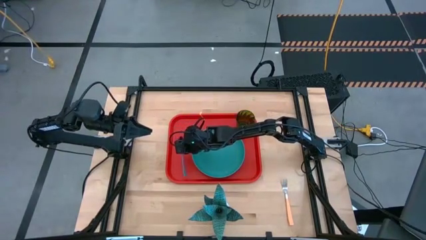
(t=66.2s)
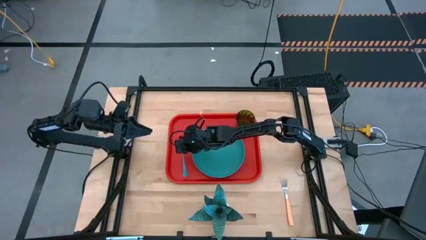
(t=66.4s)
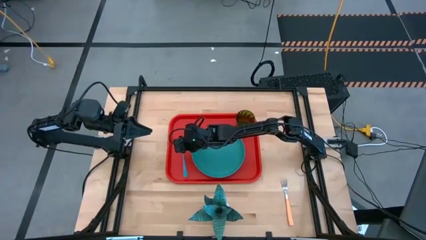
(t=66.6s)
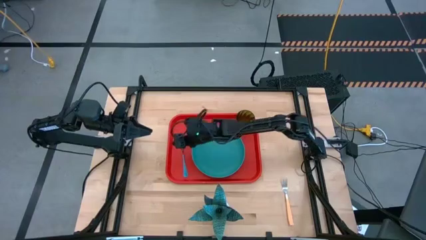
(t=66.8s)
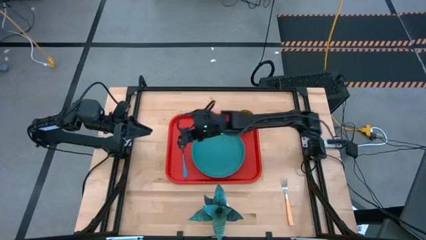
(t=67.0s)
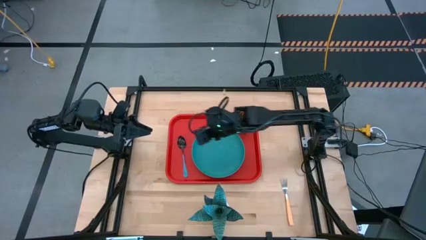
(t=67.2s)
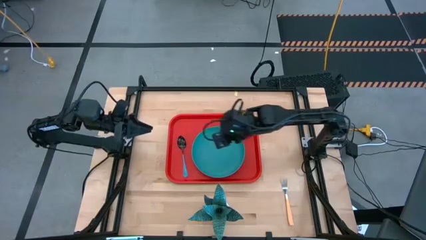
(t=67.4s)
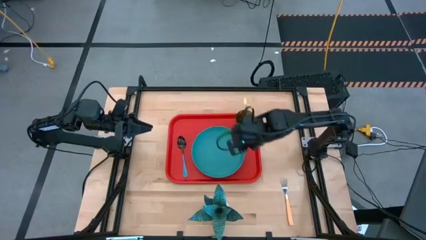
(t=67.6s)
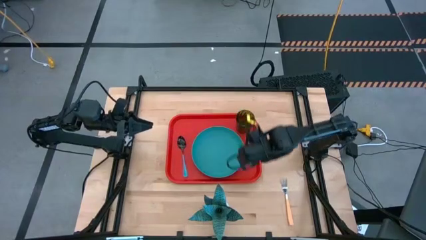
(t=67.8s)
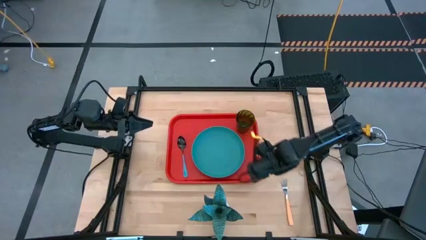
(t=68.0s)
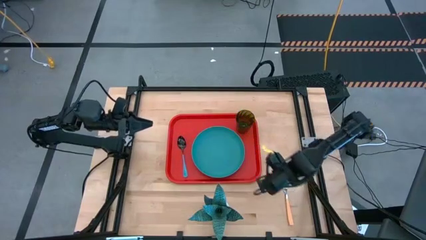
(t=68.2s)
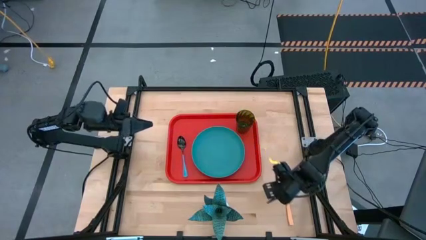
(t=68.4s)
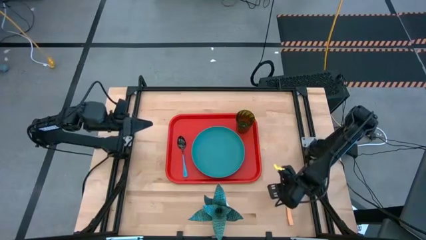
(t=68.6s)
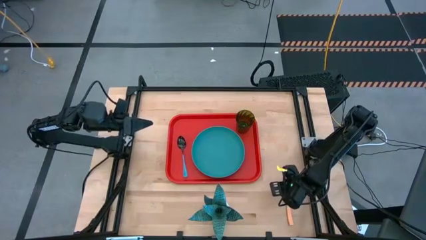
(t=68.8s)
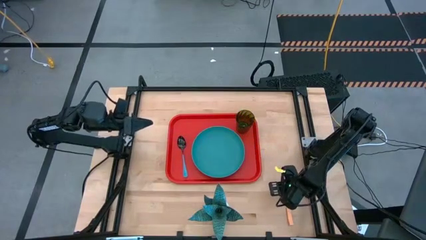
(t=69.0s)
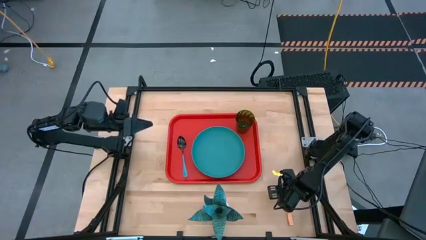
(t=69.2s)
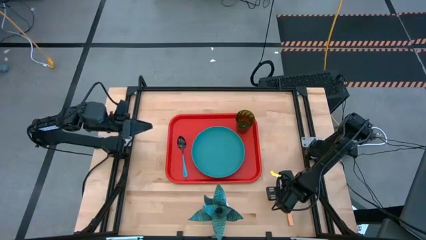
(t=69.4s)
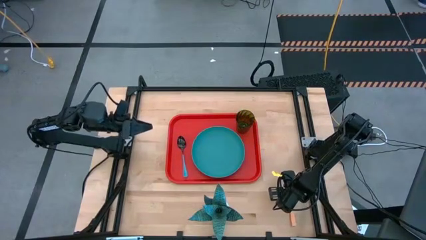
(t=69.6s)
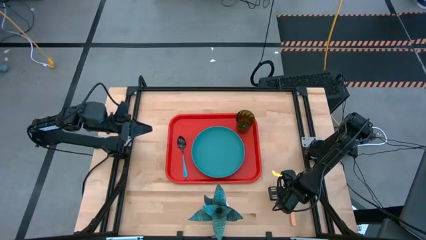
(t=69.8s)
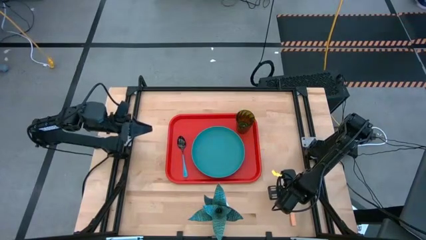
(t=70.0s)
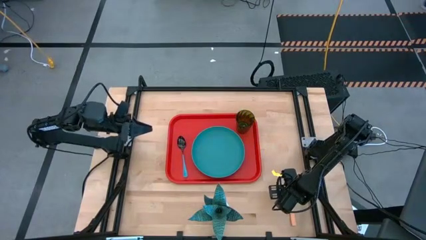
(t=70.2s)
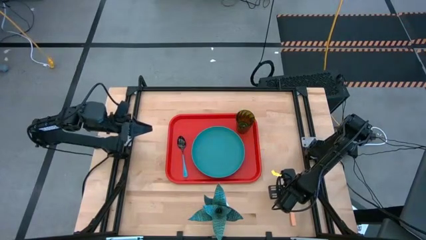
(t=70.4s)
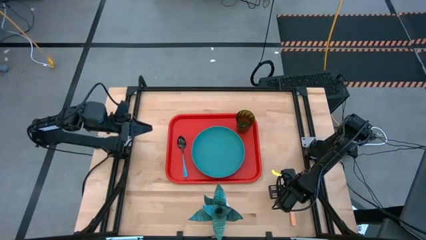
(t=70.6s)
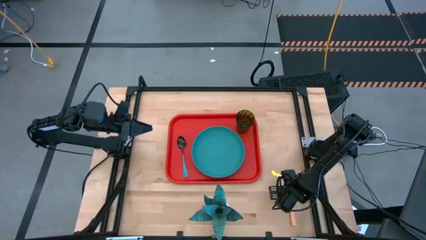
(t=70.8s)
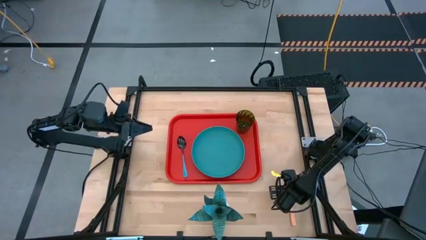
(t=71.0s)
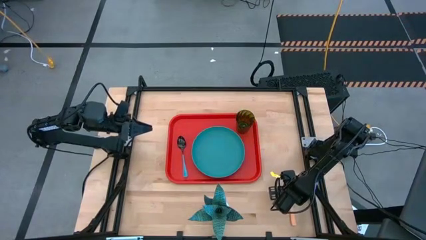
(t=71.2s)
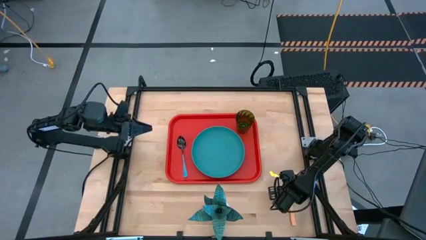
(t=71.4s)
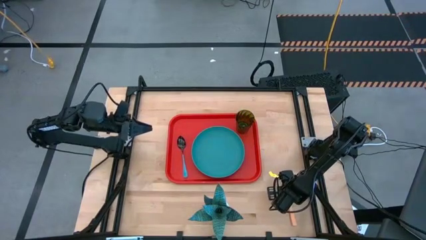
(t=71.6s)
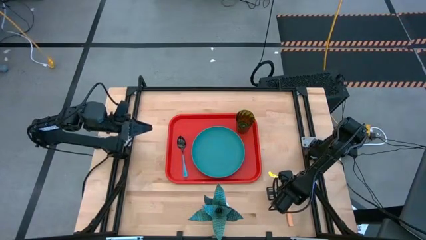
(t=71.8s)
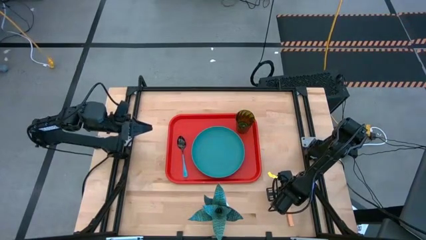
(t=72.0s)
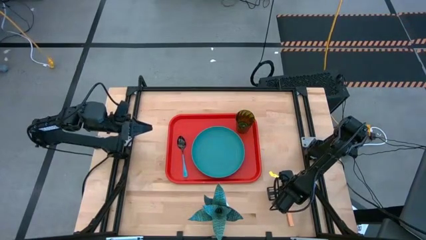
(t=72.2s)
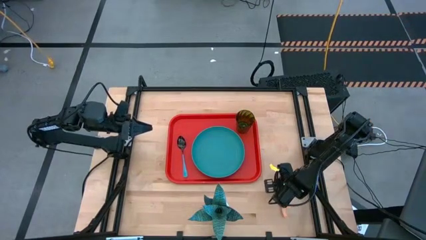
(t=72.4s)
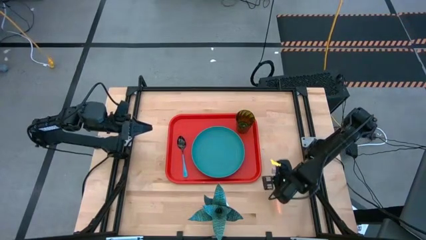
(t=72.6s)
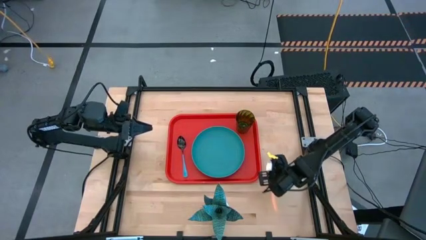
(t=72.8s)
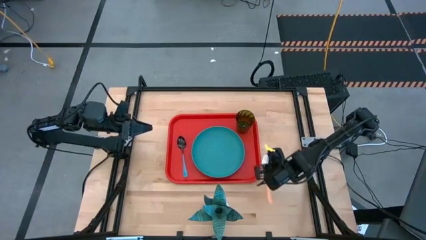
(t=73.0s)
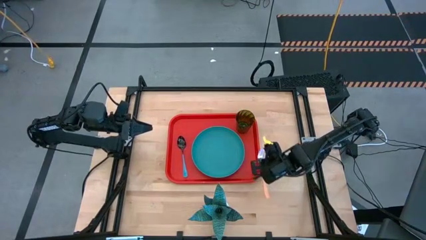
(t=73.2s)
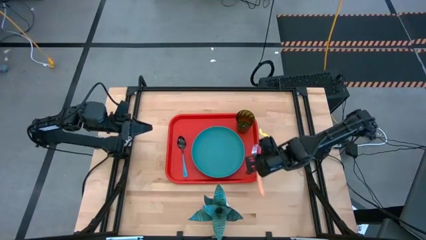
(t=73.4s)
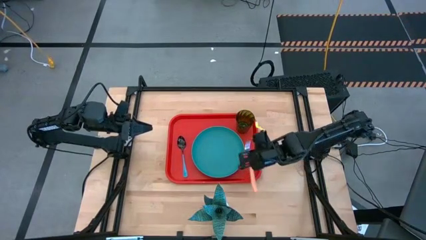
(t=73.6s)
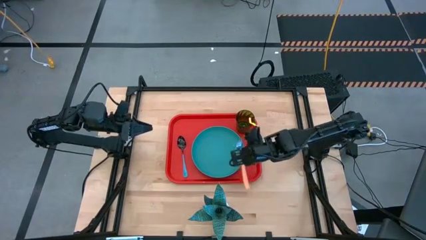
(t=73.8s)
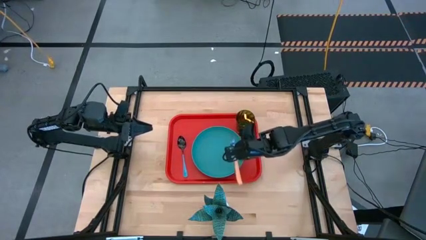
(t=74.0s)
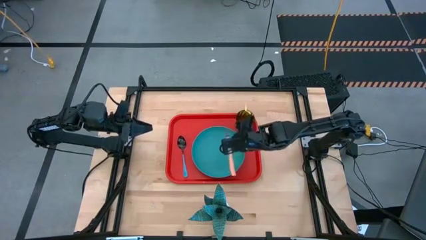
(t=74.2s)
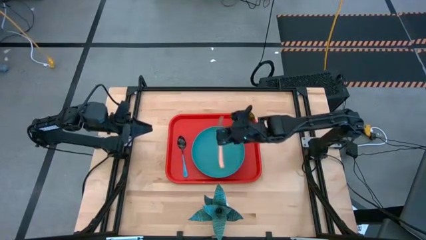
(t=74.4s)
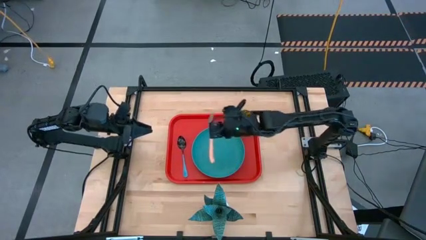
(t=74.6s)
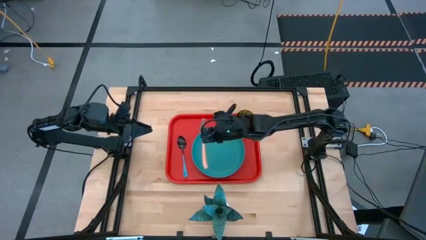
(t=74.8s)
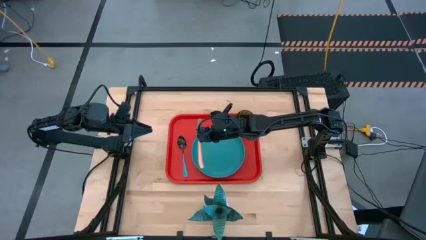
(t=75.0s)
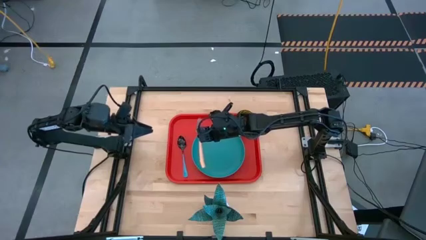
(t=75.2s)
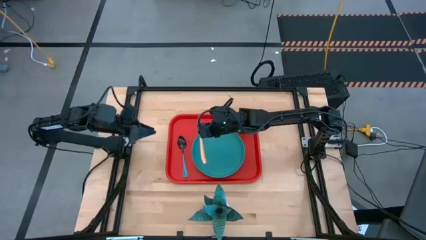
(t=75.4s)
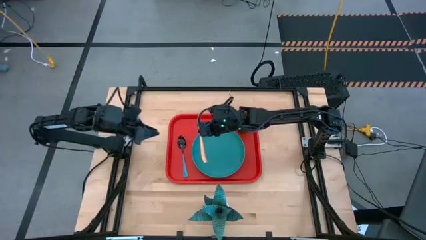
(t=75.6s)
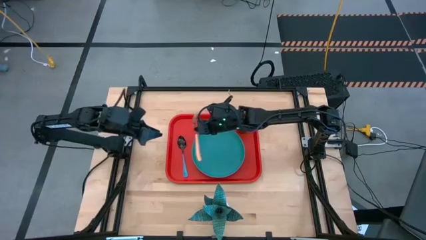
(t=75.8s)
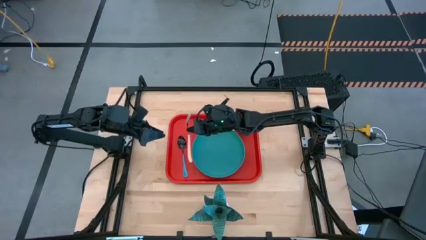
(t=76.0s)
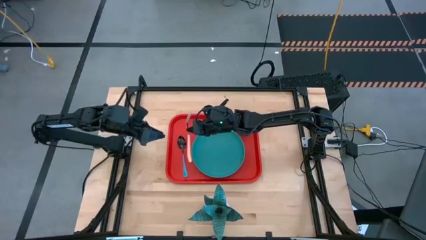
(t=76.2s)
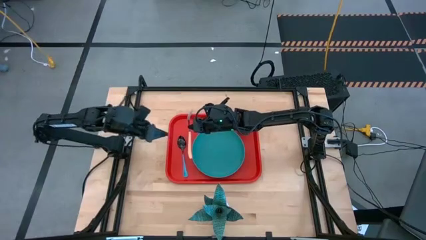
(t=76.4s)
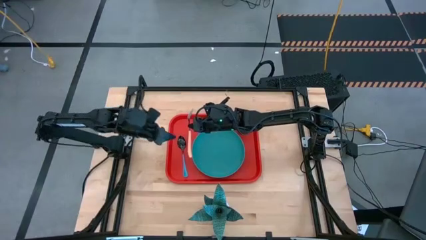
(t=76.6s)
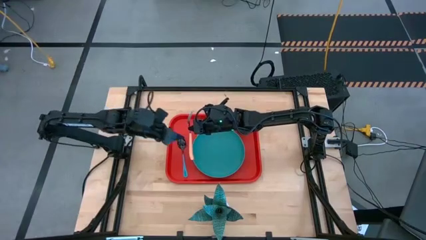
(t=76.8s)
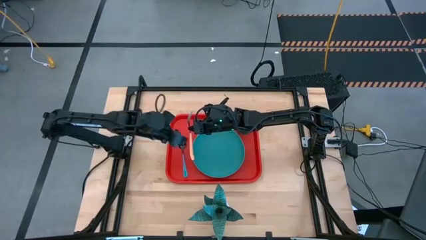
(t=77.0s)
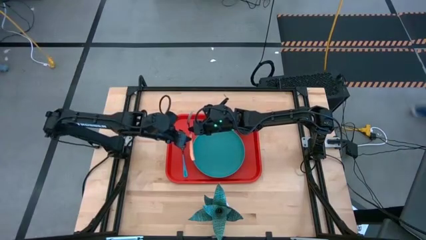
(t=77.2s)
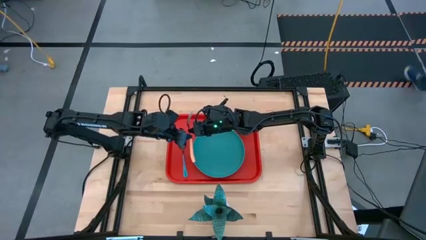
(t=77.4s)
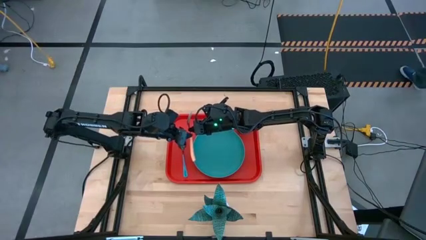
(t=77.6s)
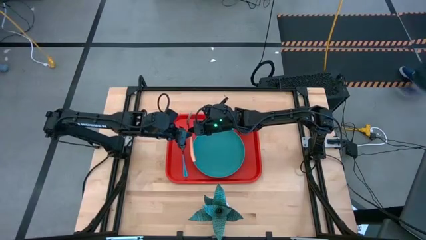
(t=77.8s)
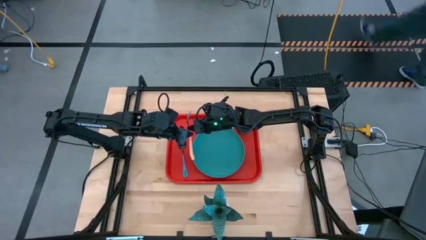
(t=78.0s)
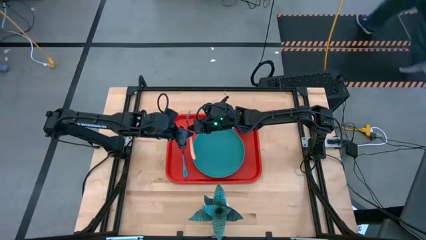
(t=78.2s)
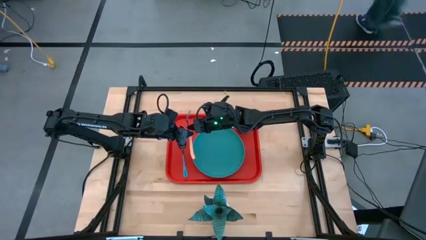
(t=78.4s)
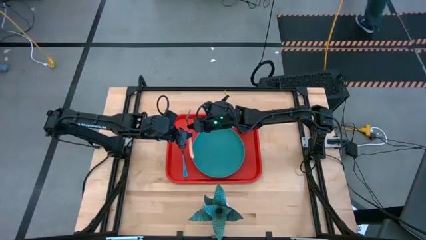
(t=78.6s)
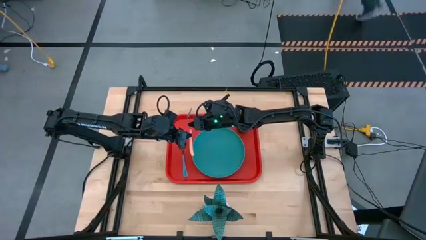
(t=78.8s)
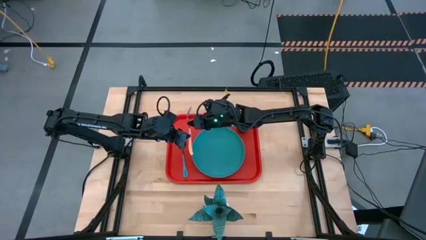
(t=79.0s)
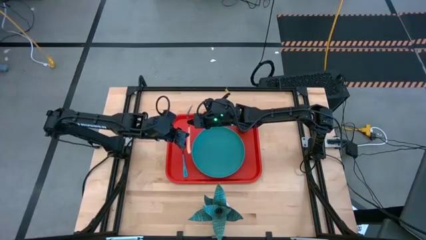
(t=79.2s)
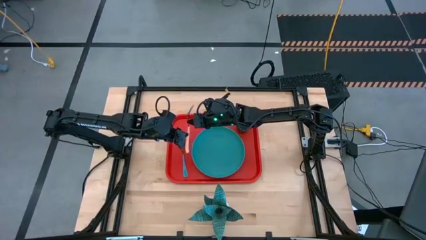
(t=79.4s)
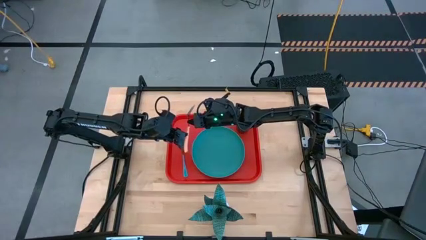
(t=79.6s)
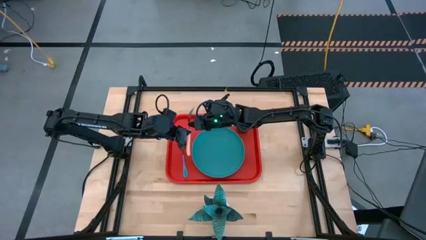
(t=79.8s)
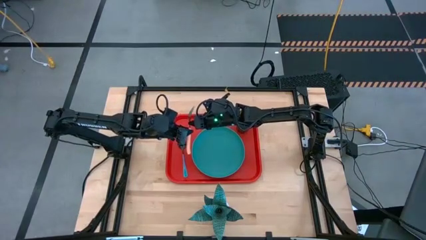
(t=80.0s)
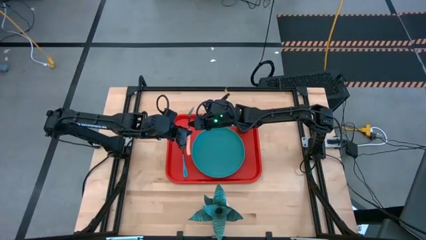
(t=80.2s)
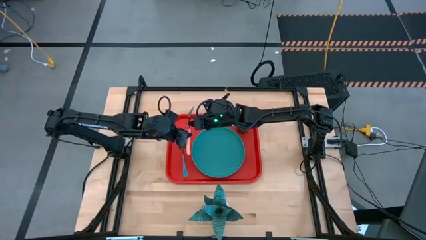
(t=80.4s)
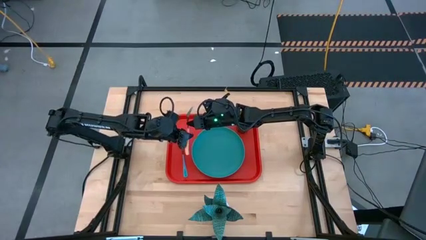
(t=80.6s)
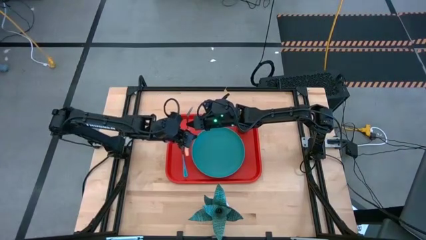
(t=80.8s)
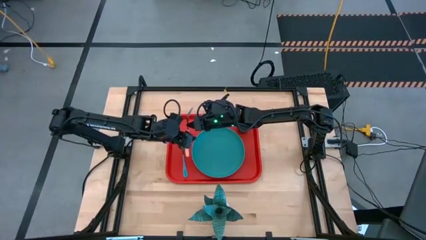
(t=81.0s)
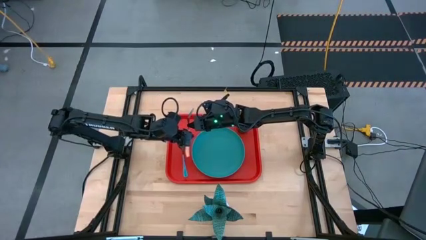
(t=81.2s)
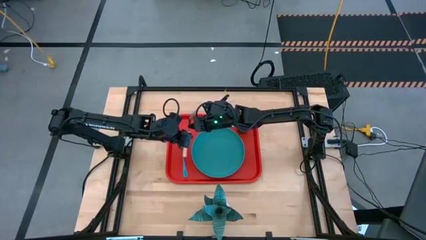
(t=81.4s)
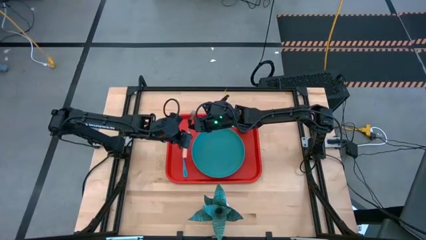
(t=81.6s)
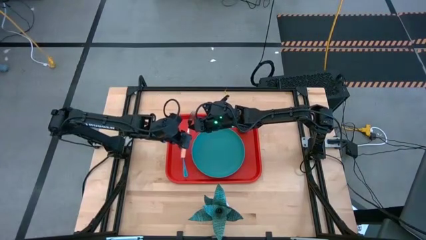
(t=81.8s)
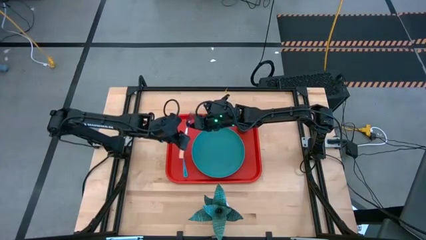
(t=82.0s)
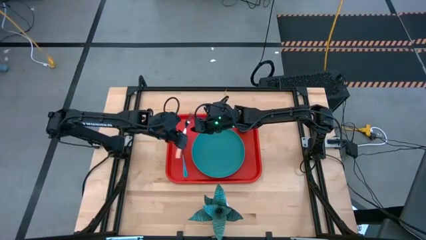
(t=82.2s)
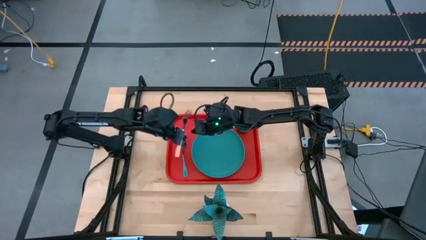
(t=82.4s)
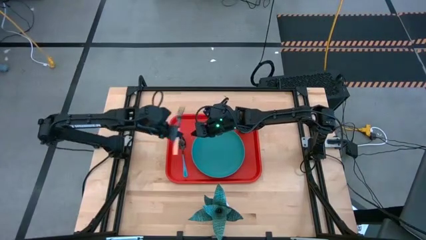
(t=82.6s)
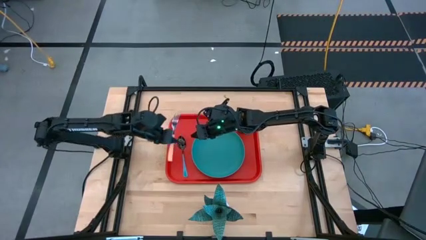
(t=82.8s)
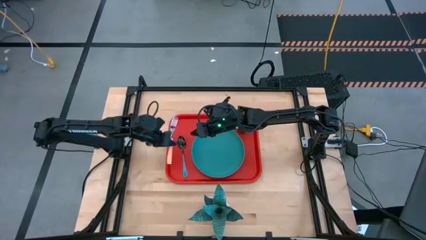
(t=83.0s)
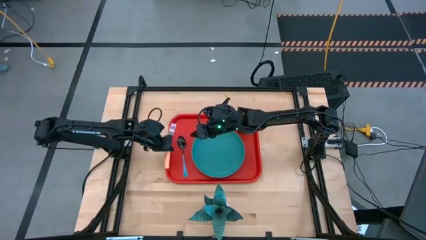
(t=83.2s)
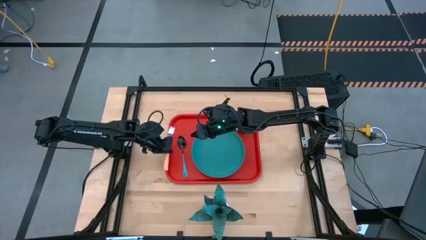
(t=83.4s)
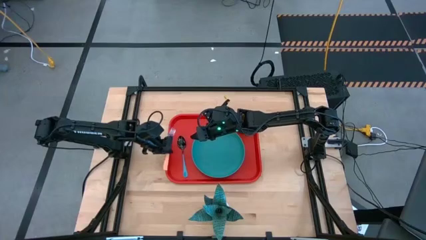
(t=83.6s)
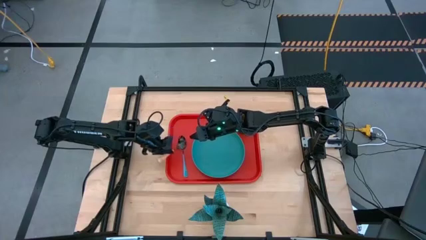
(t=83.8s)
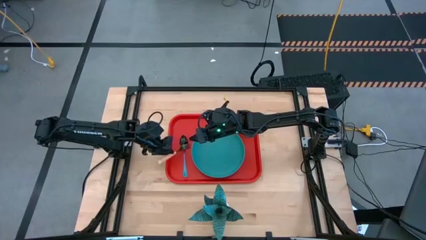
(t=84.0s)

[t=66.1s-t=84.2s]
Task: Pick and place plate/cup/fork/spoon on tray
Put the yellow fork on the orange tray between the green plate and the green spoon
